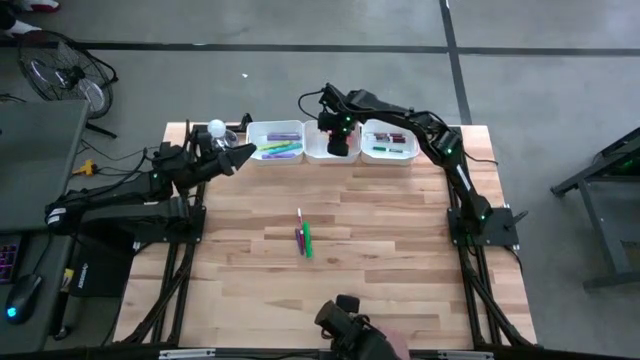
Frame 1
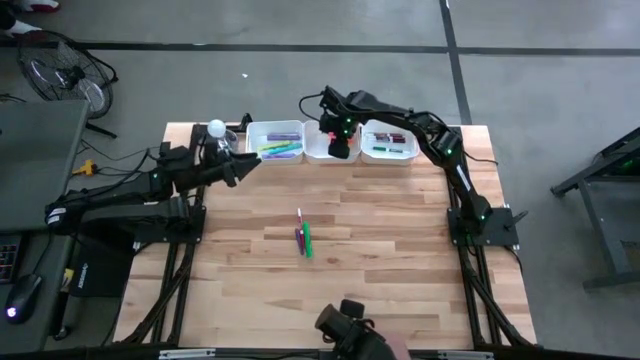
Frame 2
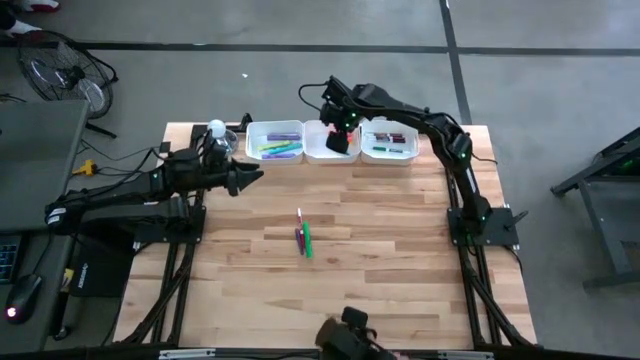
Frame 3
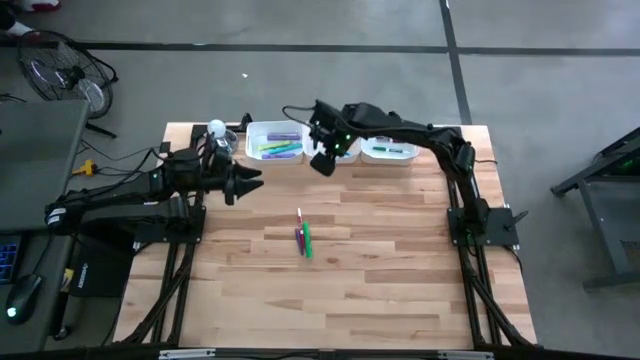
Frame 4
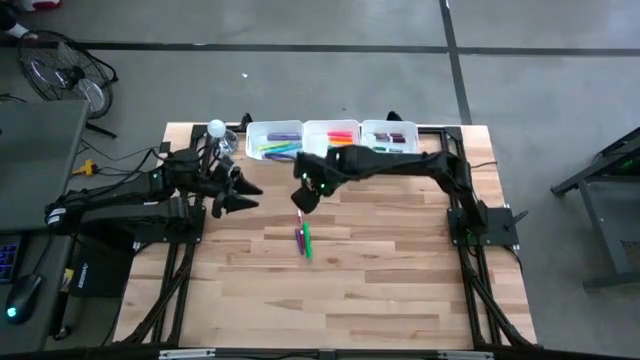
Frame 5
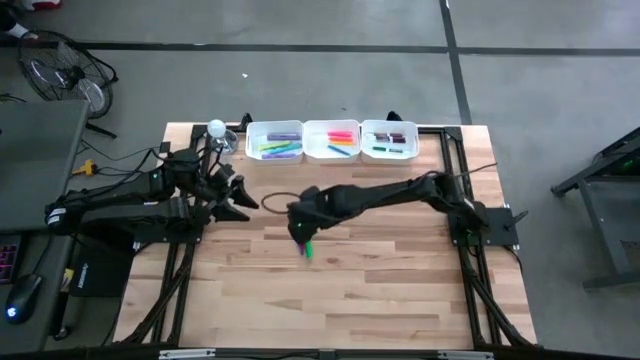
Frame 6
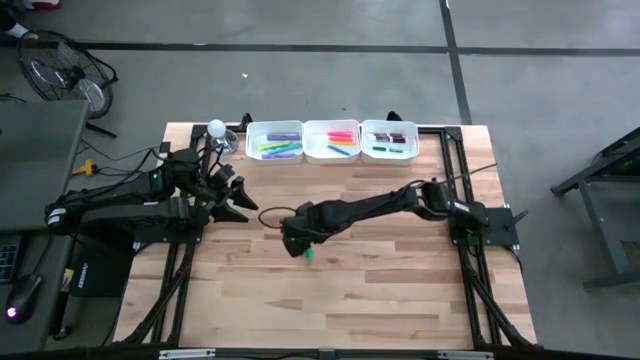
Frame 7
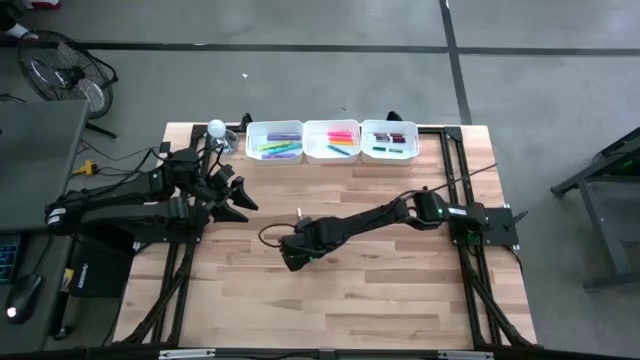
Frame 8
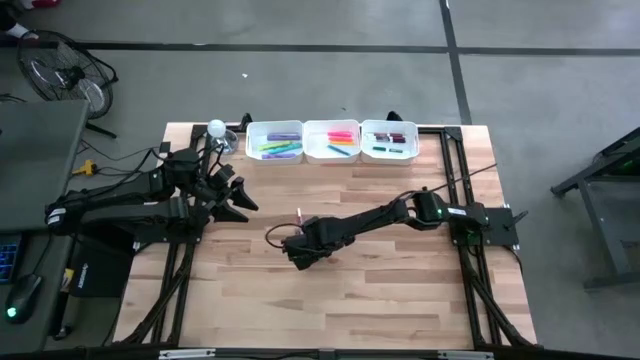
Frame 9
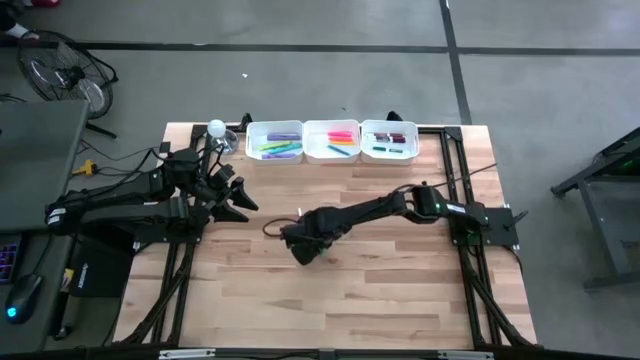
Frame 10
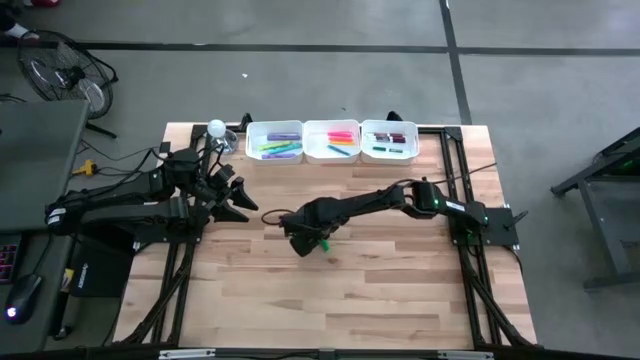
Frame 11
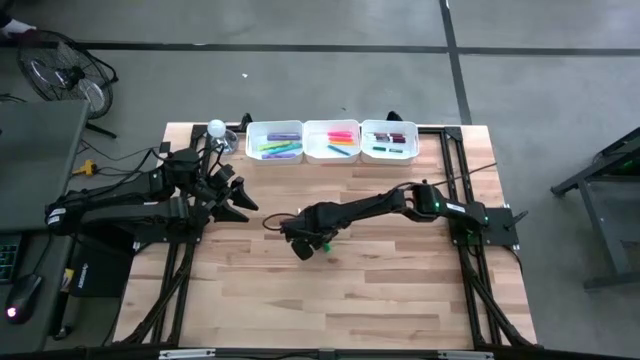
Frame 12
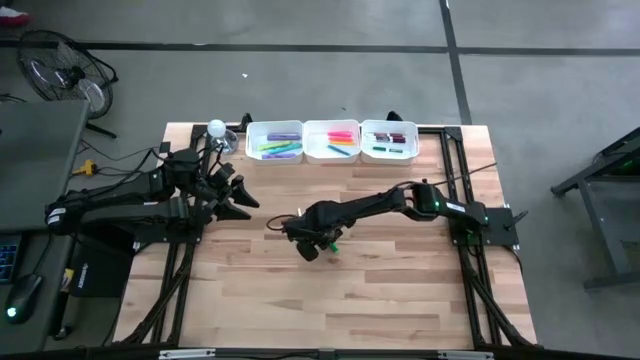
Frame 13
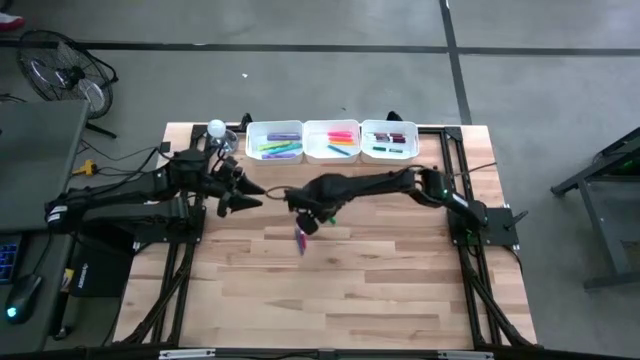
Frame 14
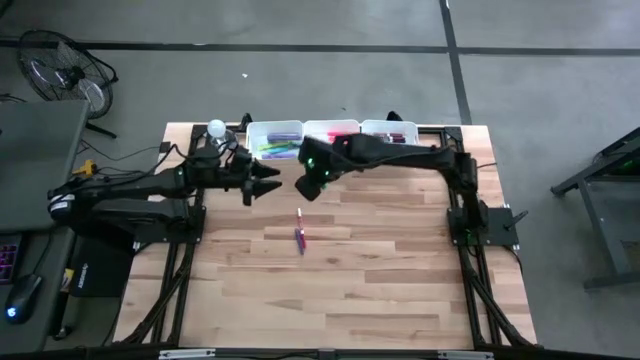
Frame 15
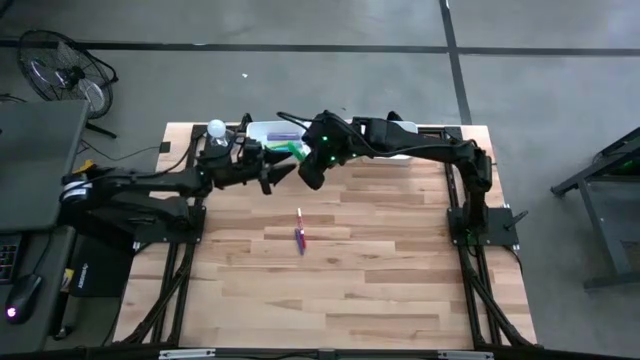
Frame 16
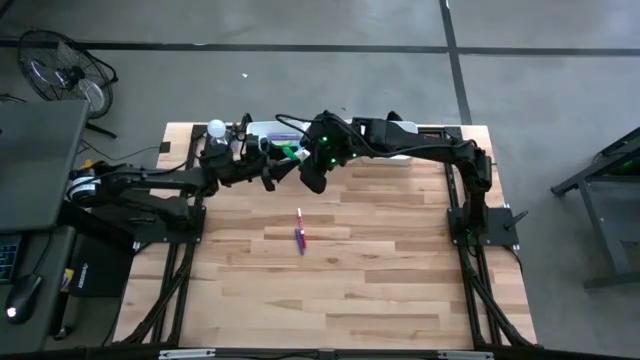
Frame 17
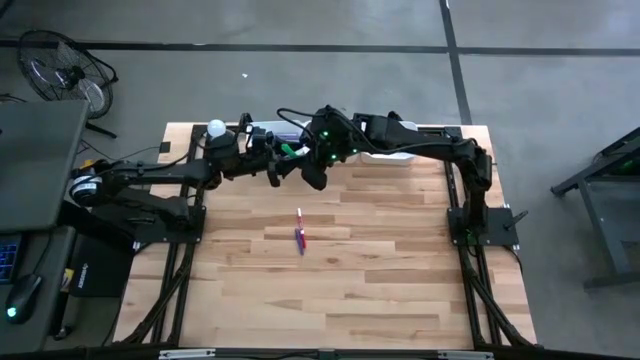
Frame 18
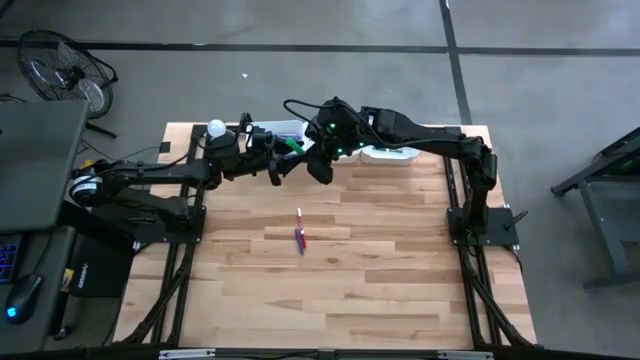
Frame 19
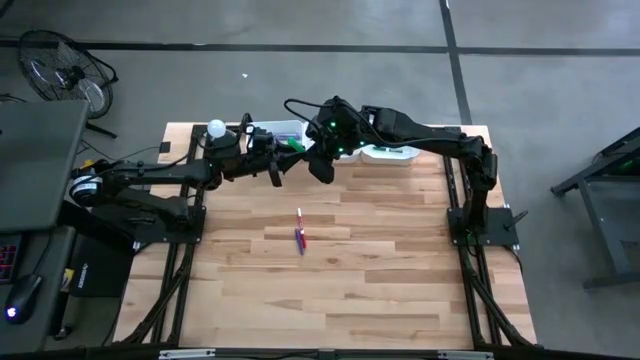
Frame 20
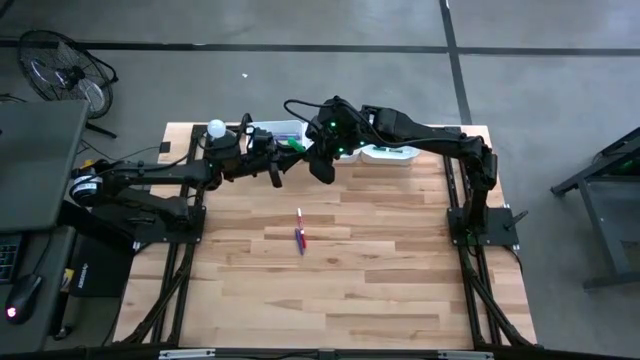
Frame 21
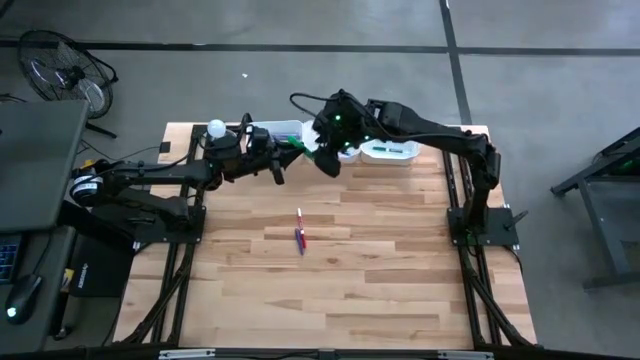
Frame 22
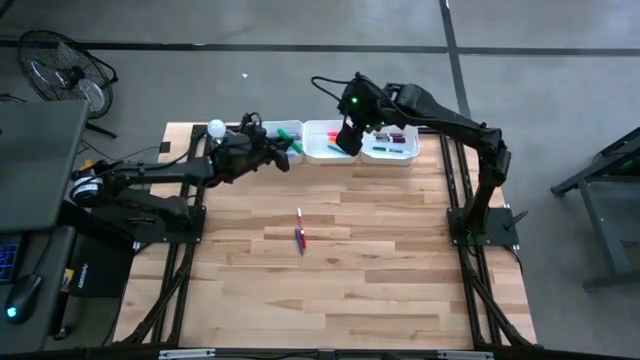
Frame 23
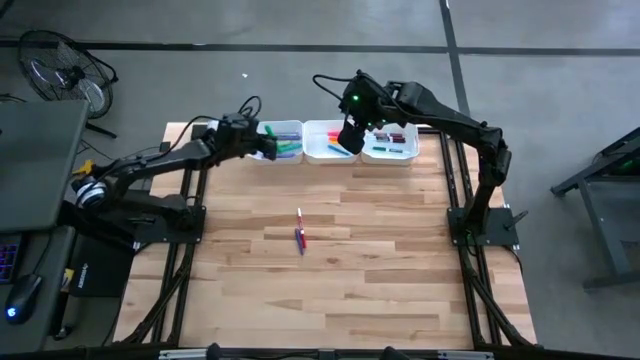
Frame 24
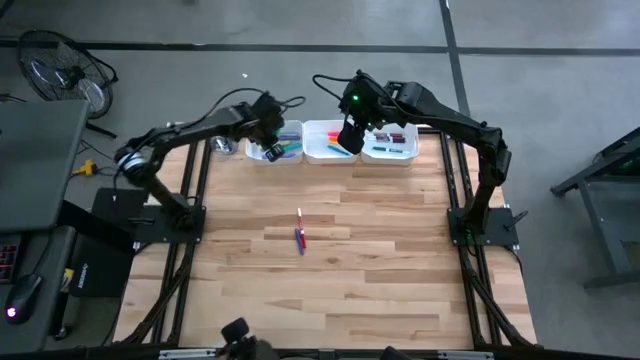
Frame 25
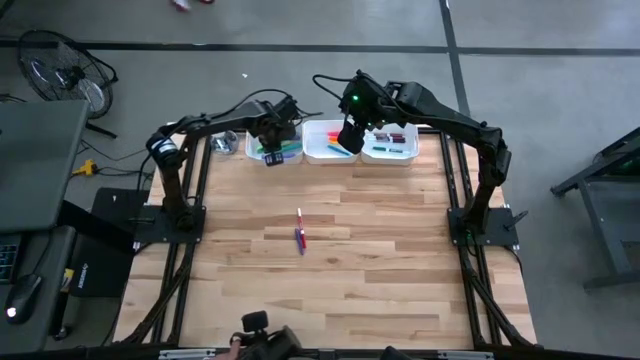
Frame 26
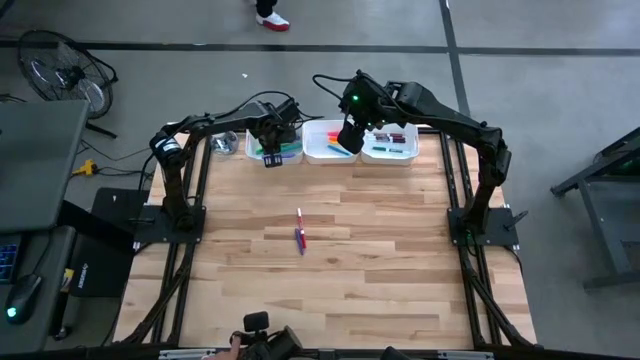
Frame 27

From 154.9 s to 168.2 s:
Task: Pick & Place Markers
Put the green highlighter pen into the left white bin

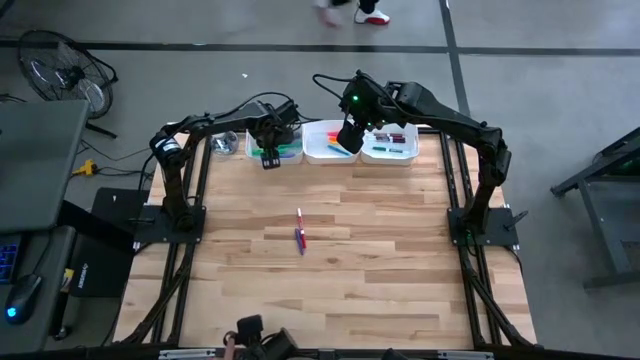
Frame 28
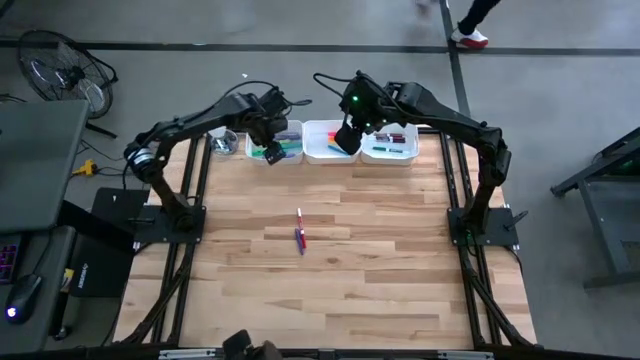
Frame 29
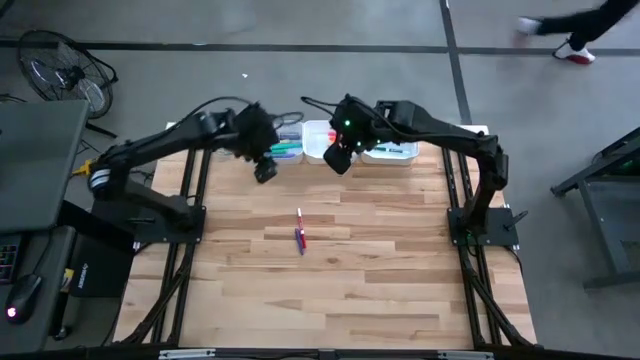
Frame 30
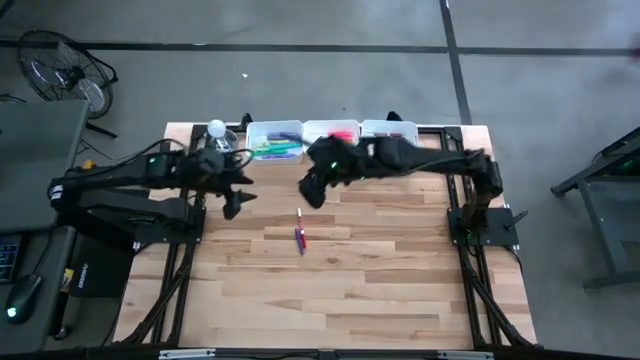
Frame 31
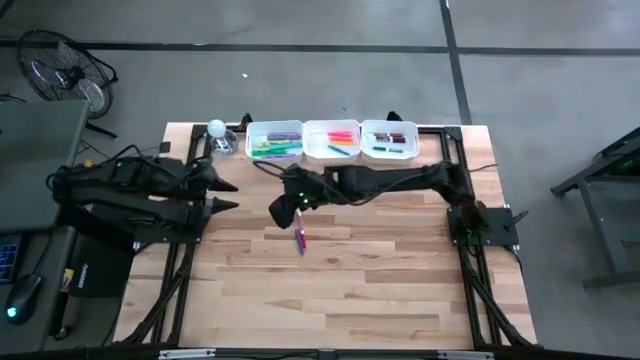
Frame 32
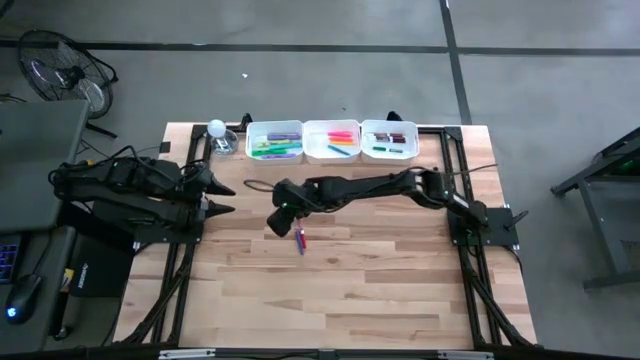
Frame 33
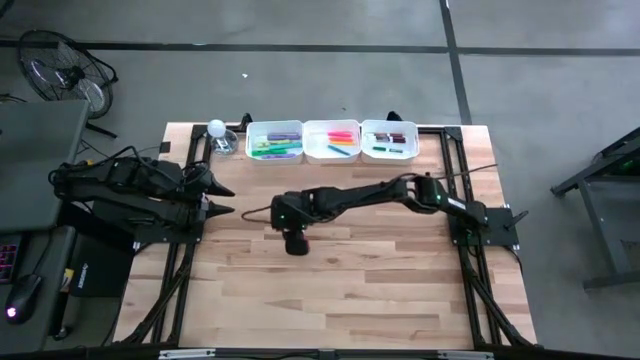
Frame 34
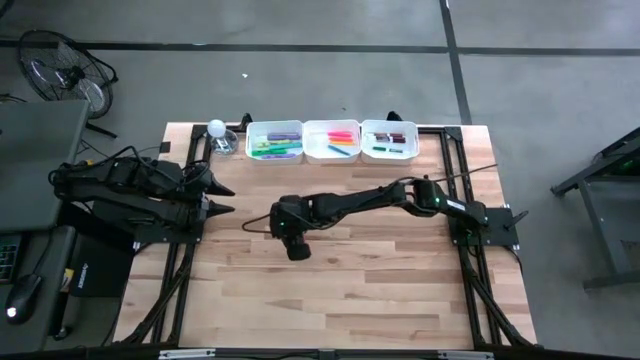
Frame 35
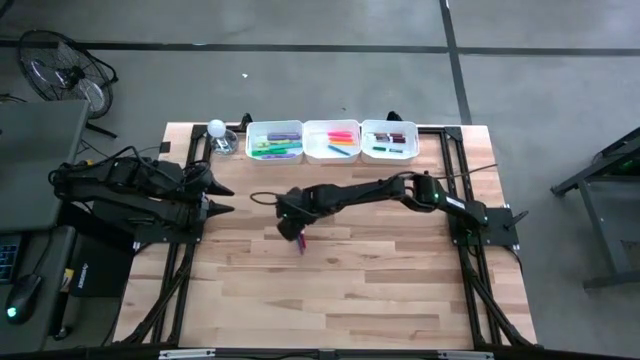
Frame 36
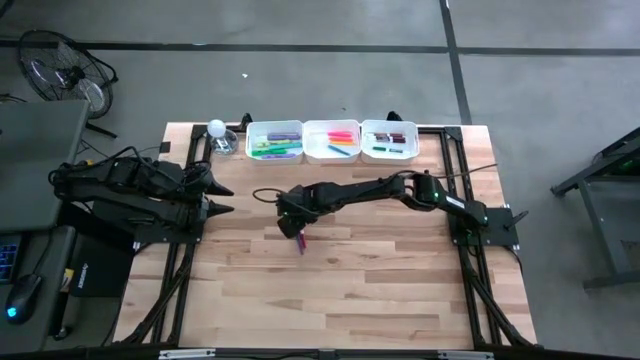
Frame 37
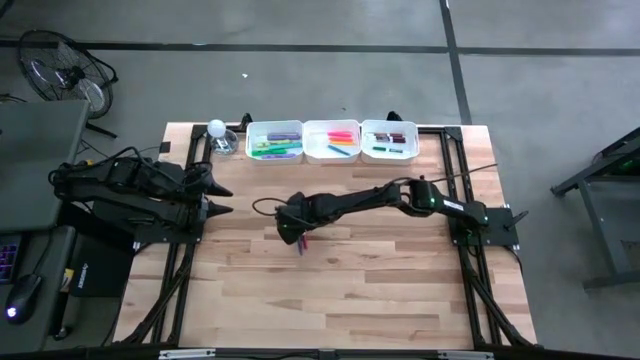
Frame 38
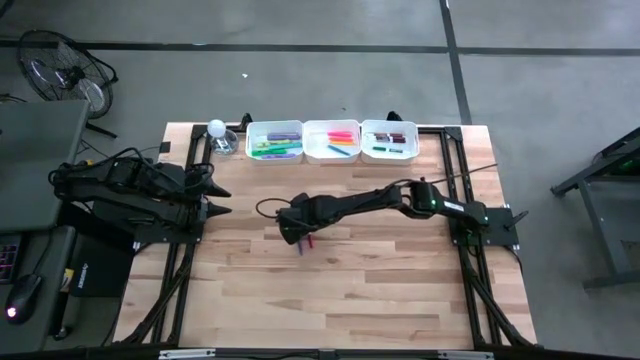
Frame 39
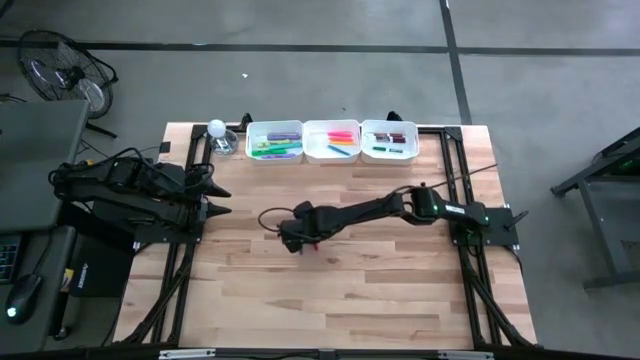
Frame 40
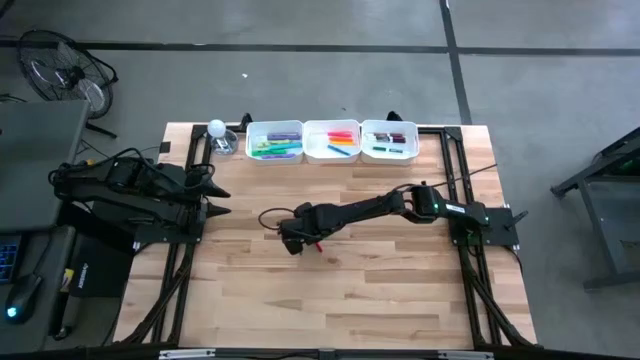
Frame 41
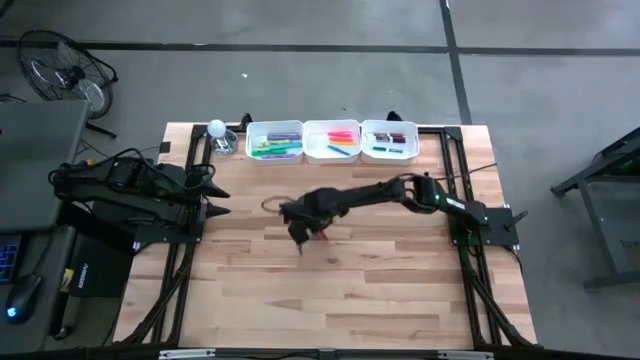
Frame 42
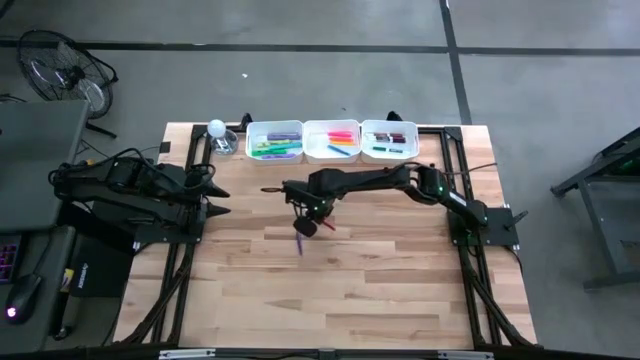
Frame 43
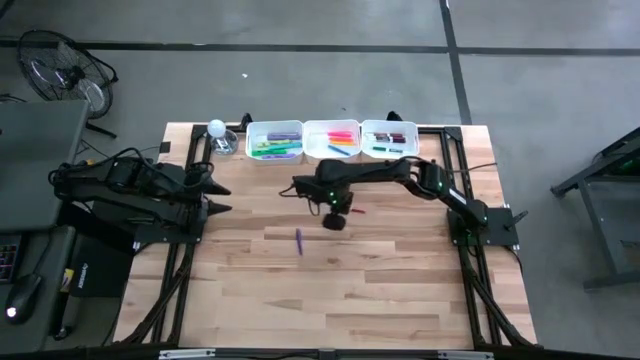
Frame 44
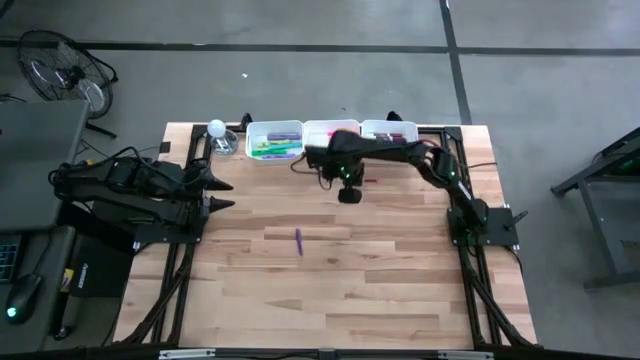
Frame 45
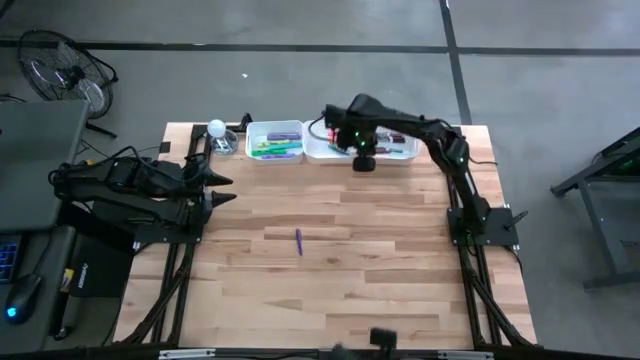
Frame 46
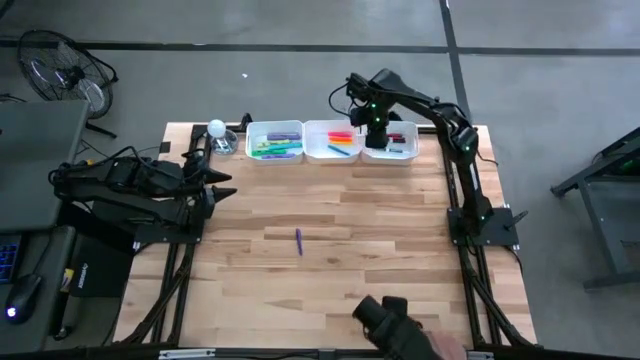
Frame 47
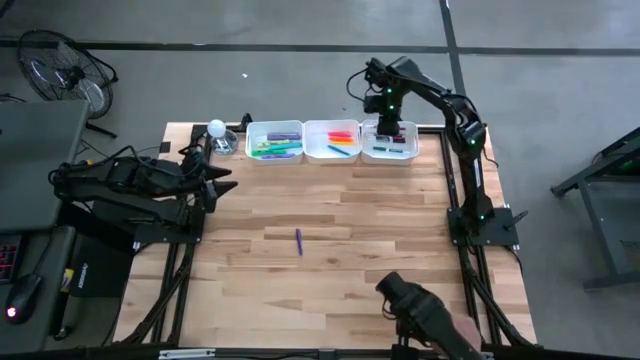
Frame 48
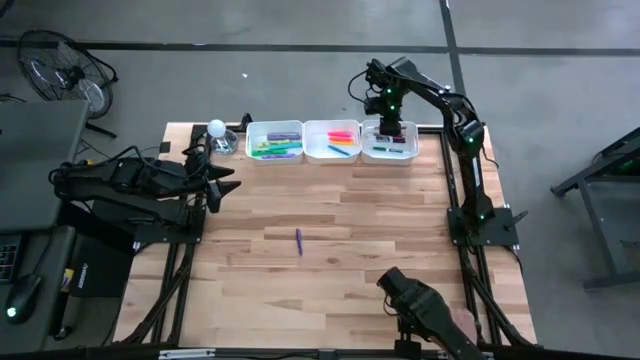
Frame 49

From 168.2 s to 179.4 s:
Put the red marker pen into the right white bin
